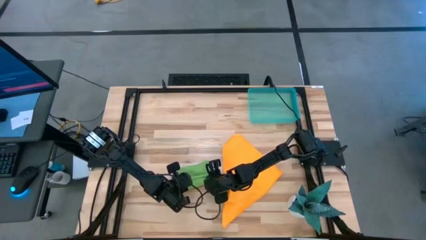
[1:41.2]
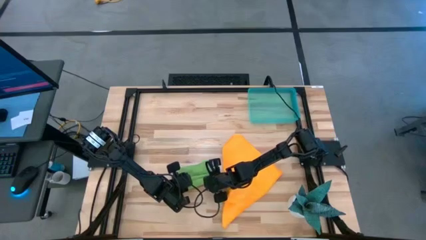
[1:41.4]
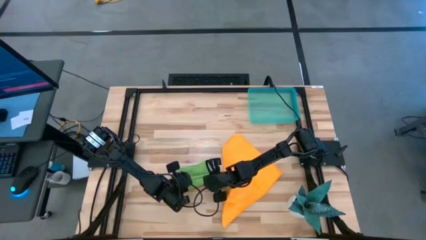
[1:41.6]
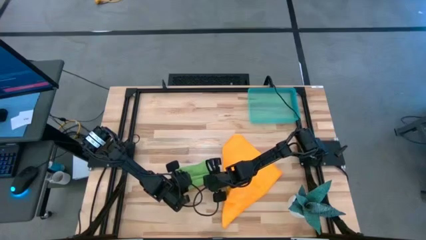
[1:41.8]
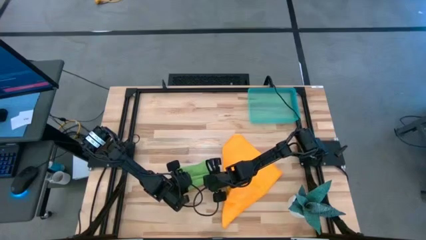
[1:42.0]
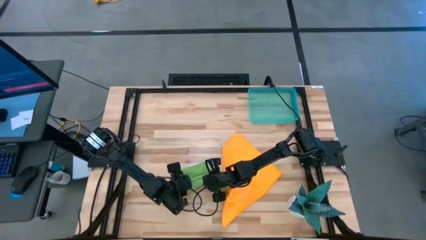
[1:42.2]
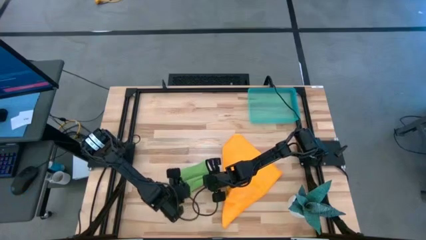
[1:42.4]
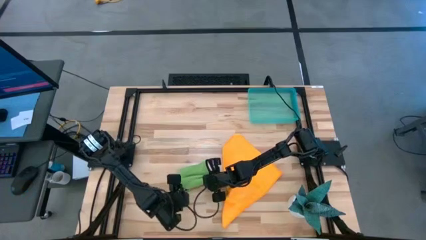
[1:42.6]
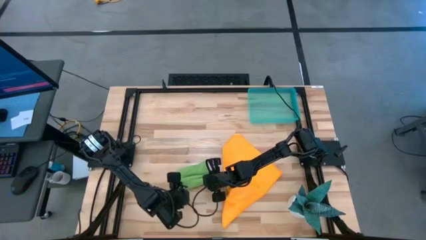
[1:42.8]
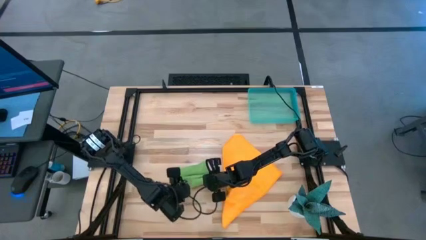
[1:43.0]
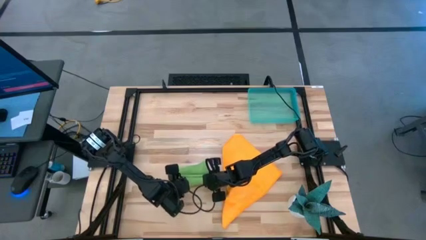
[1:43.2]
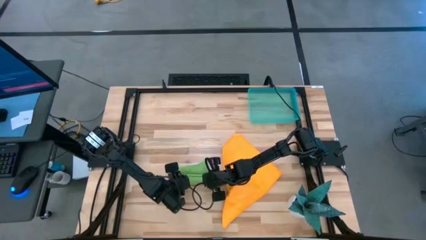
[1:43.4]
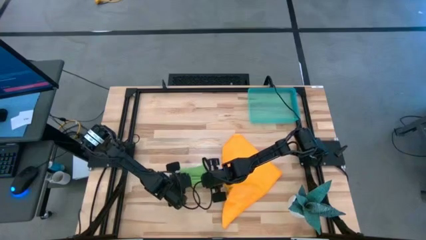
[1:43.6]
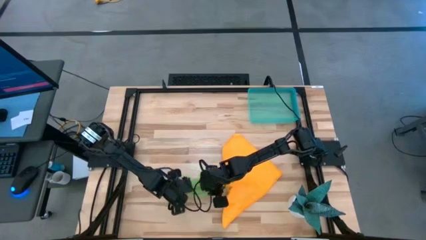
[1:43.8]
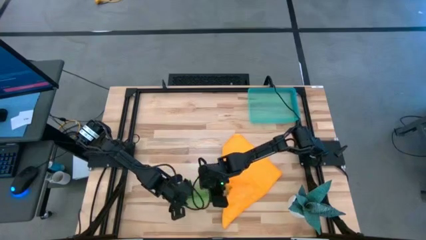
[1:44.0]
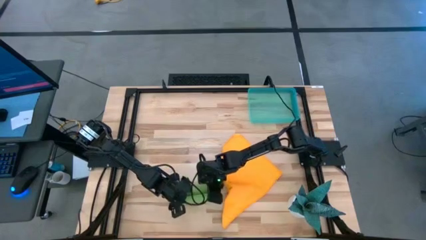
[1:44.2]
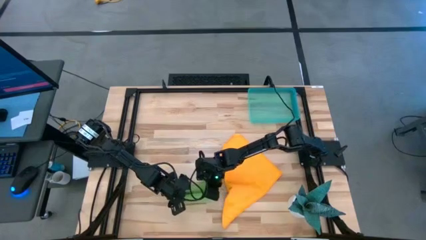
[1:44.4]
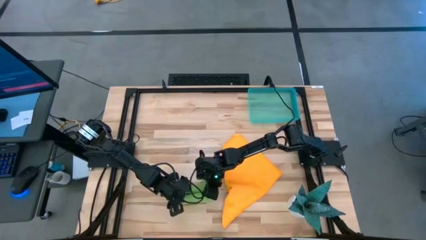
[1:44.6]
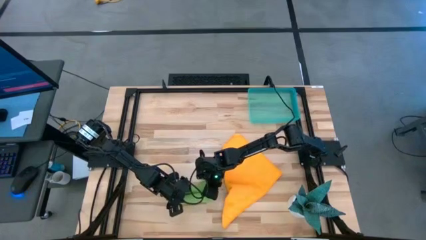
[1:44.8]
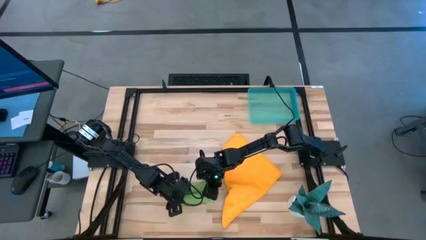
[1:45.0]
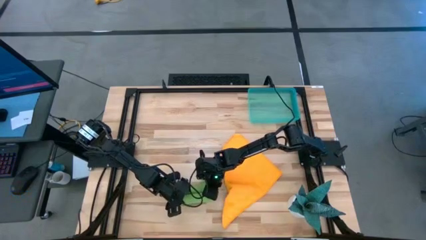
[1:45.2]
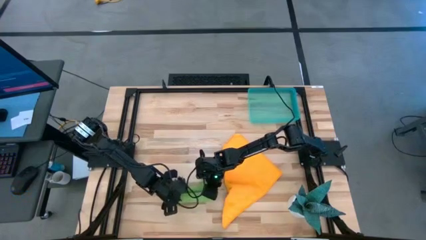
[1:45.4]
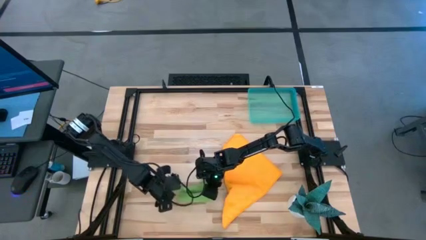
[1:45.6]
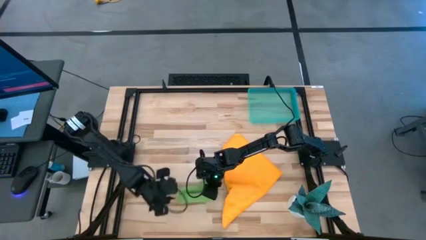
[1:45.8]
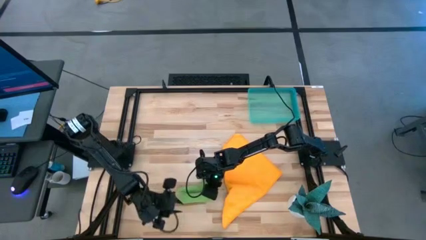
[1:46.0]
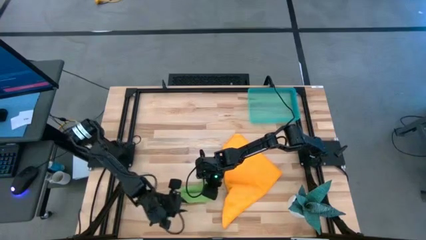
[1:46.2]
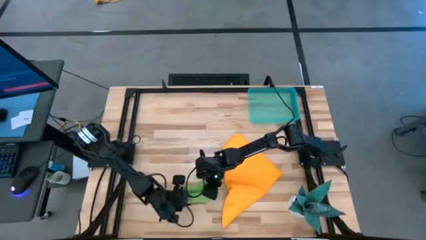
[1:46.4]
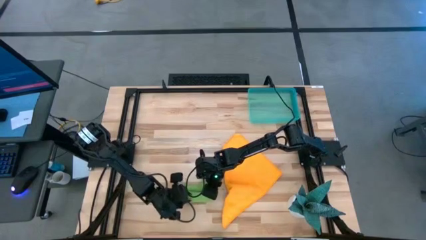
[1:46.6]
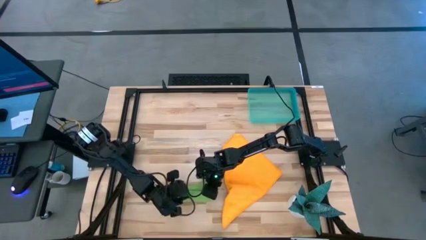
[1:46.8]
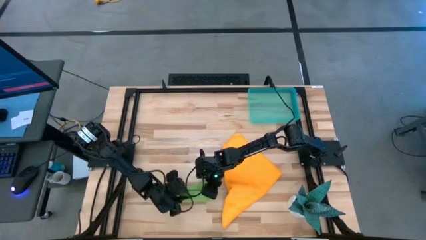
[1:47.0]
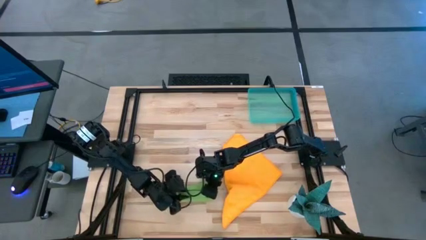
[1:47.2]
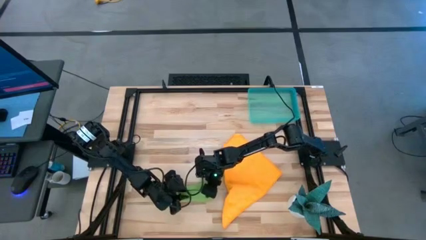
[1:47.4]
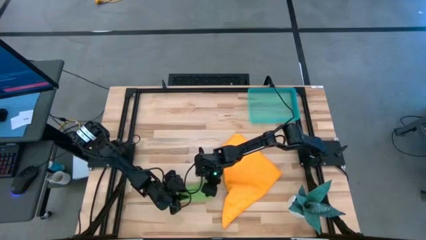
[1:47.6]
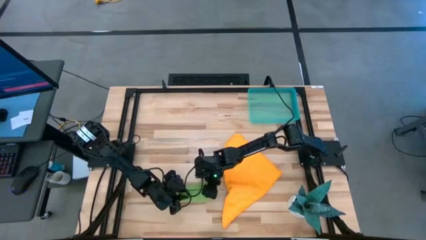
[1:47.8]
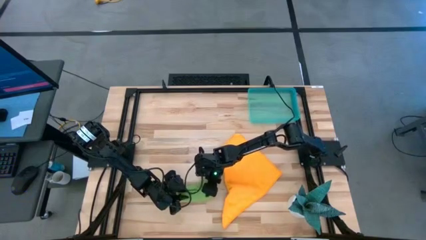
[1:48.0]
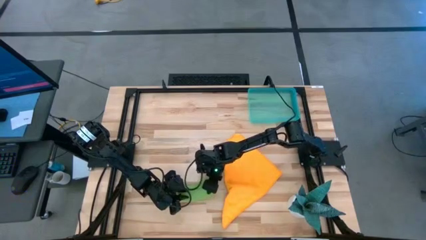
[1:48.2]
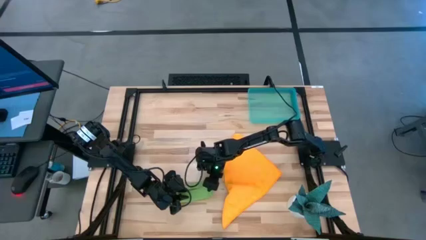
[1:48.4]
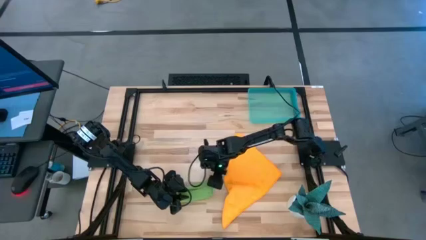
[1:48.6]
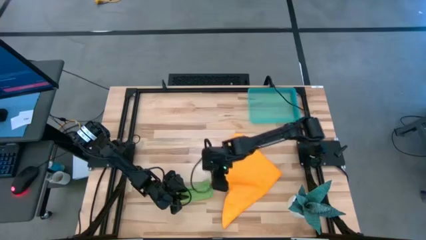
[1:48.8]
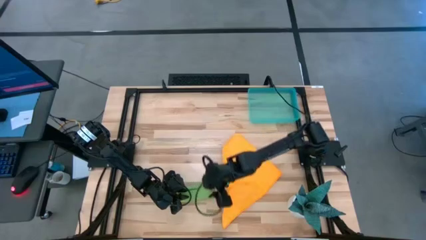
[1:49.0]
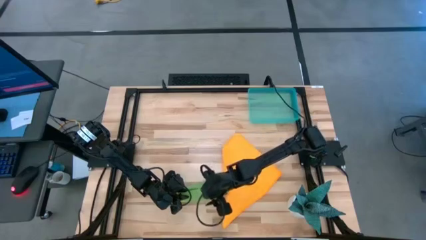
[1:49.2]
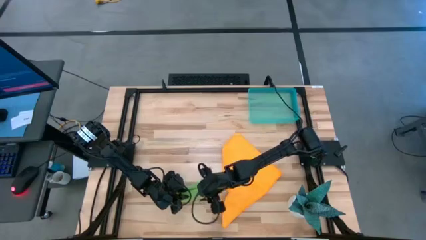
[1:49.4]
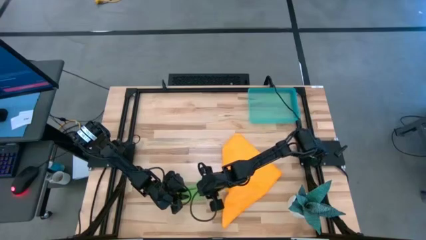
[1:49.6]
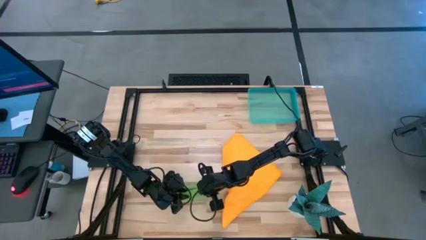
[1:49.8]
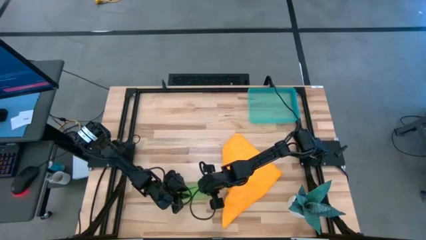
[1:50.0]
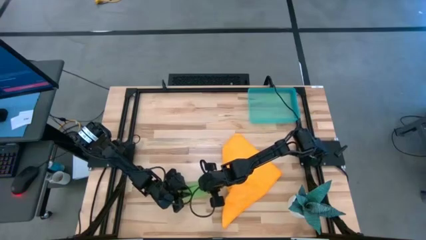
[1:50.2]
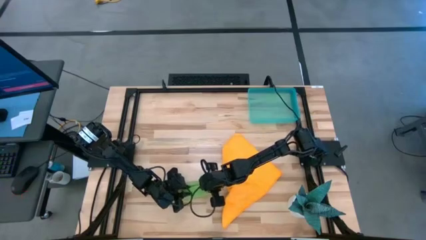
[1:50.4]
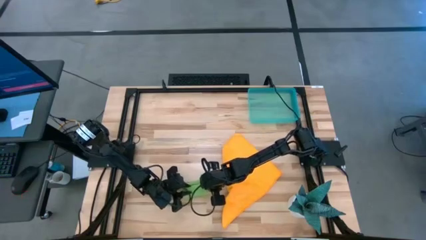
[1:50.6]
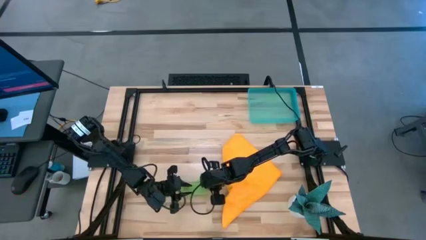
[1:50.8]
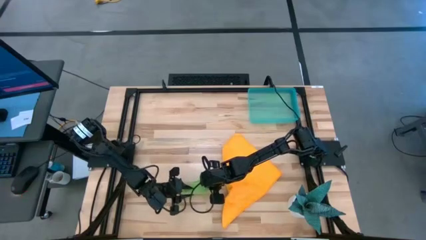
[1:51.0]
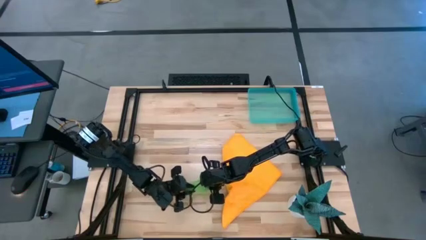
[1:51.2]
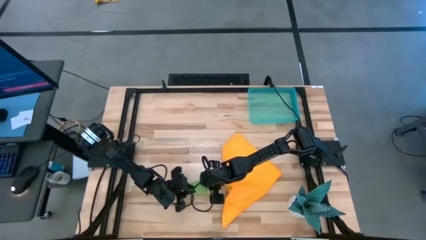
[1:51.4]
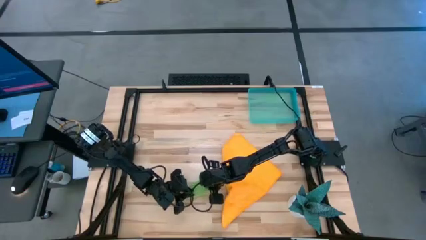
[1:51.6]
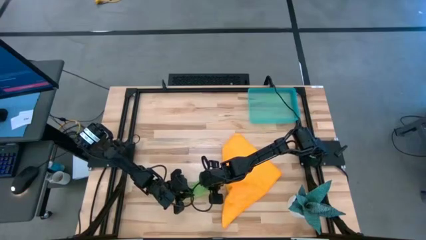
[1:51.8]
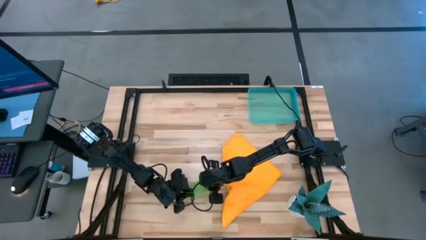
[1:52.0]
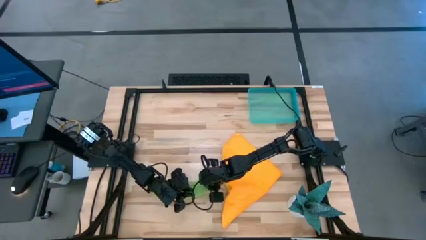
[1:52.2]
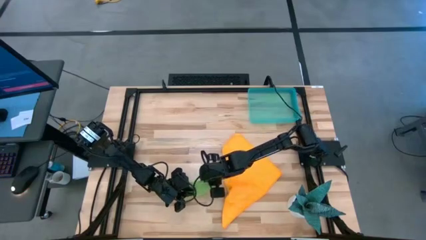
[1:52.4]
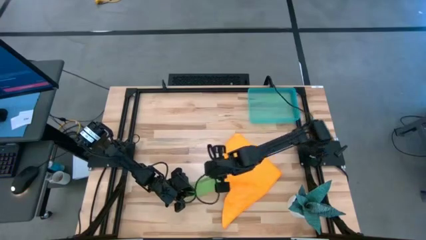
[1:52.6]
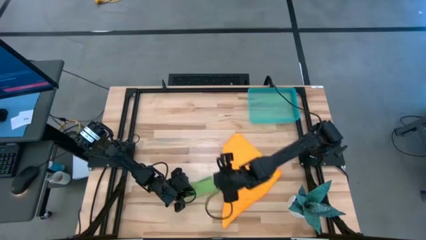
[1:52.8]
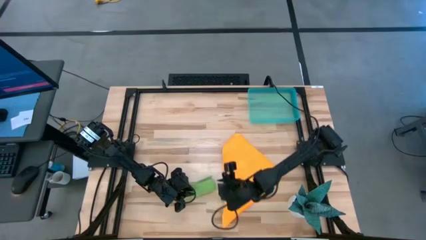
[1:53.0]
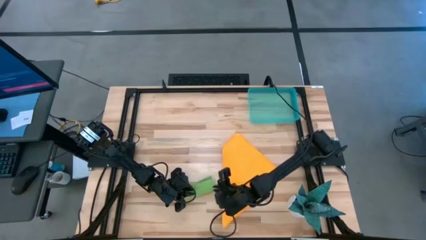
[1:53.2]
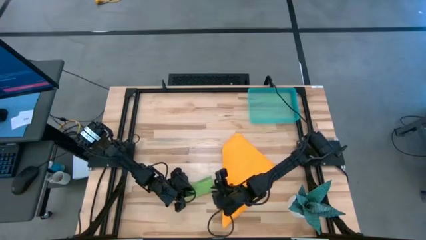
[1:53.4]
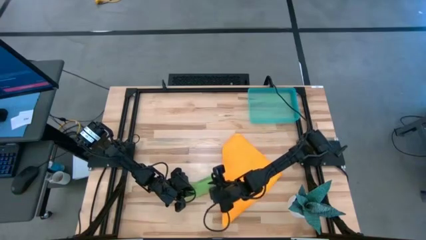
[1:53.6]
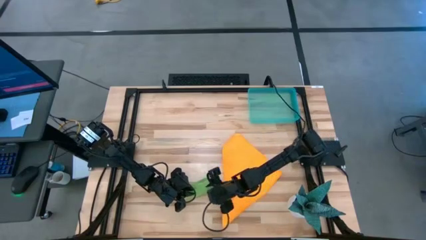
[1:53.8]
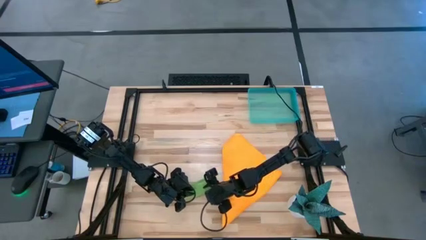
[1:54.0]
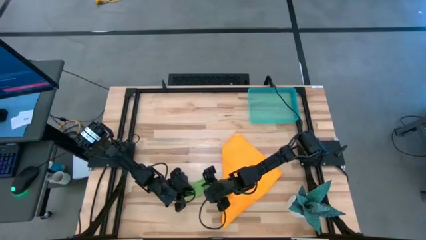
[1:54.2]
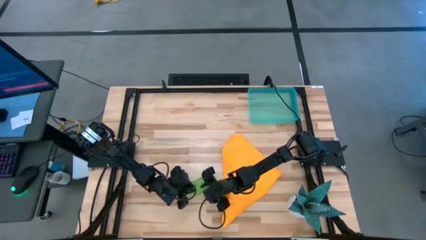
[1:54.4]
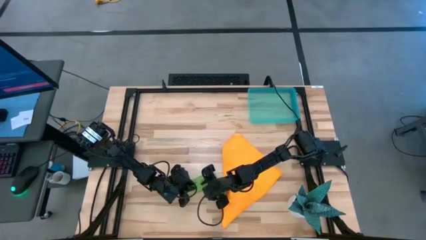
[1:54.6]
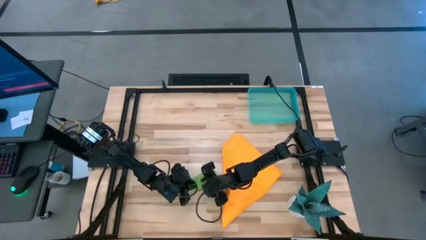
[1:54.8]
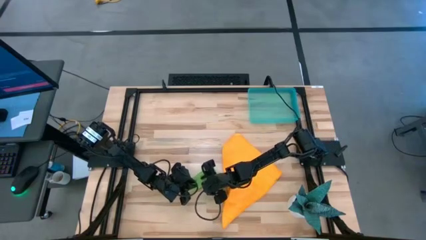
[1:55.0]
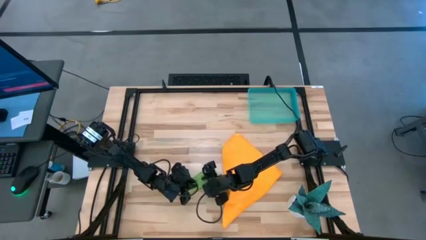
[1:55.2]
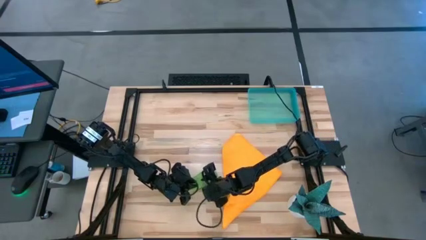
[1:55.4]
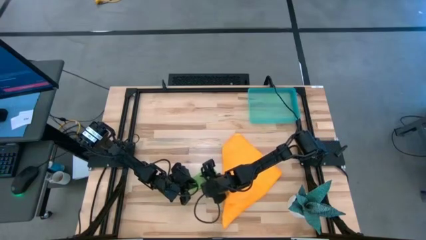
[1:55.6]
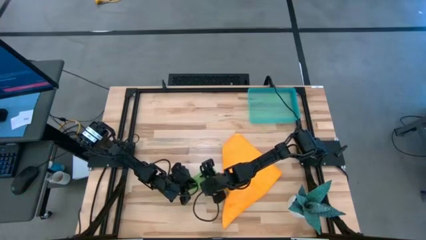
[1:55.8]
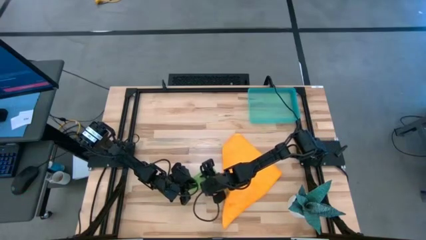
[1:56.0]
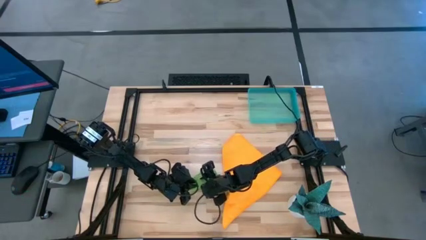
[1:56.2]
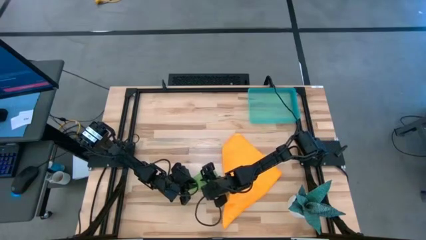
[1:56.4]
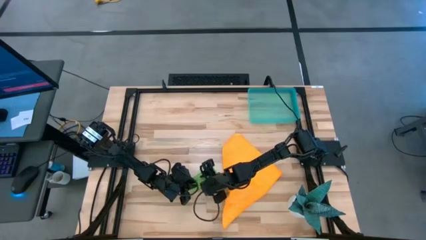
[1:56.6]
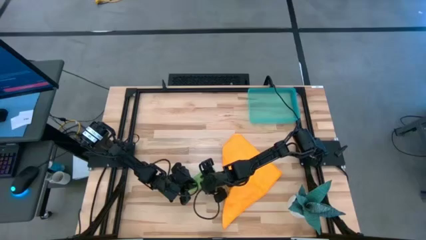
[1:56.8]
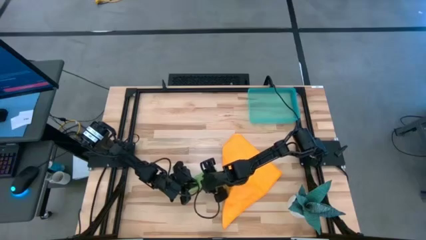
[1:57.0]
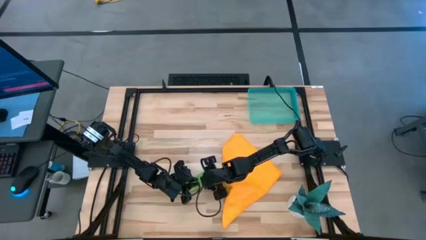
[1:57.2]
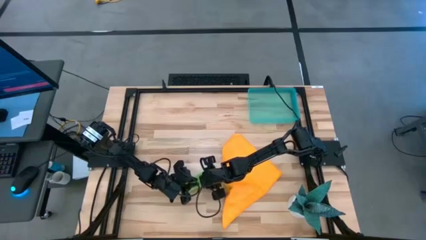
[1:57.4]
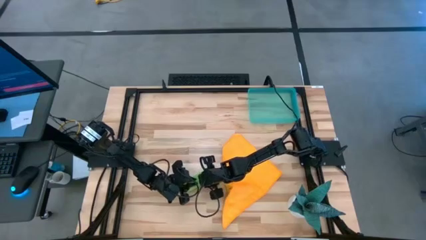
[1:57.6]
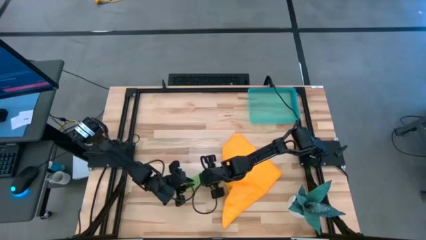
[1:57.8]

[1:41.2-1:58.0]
Task: Roll microfiber towels into tight, uniform cylinder then place into a basket
Roll the green microfiber towel
